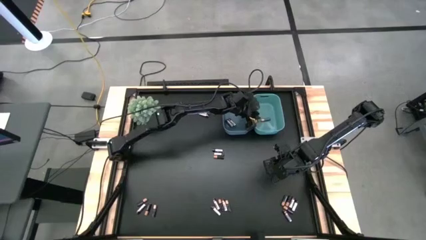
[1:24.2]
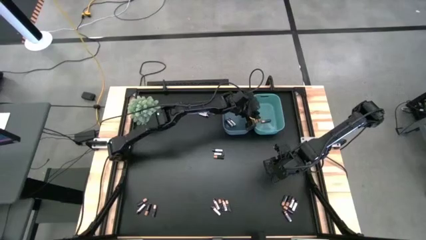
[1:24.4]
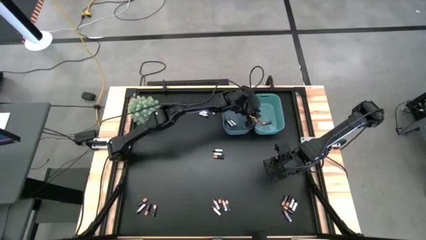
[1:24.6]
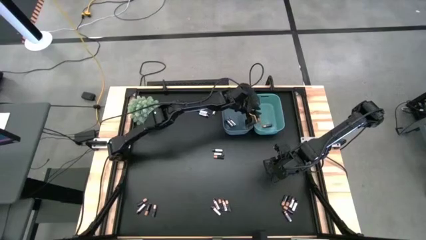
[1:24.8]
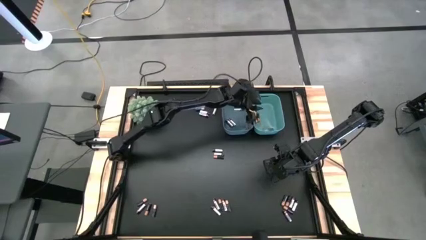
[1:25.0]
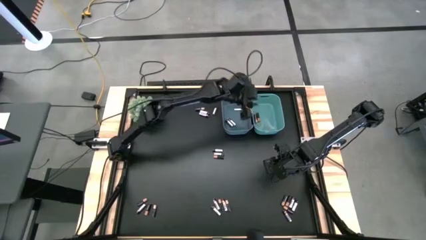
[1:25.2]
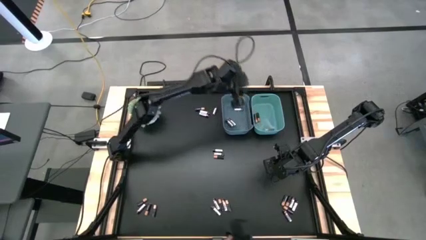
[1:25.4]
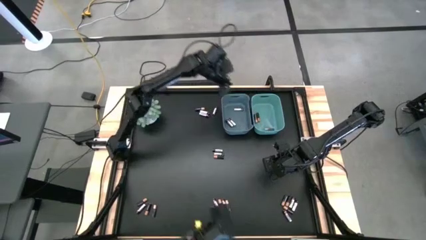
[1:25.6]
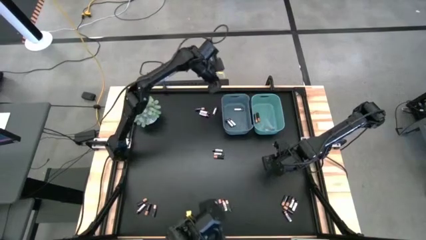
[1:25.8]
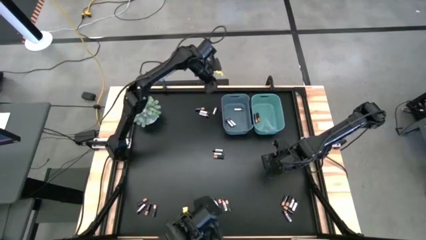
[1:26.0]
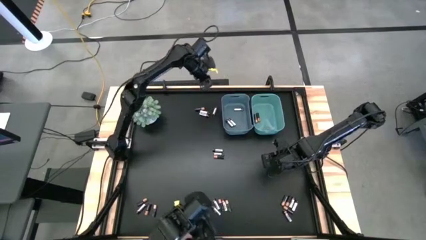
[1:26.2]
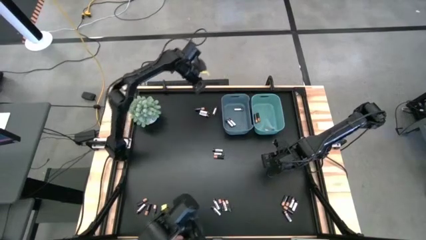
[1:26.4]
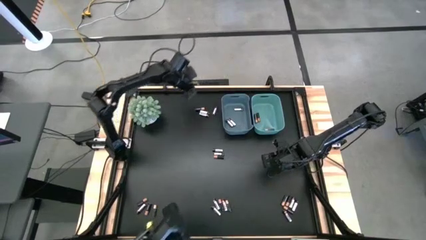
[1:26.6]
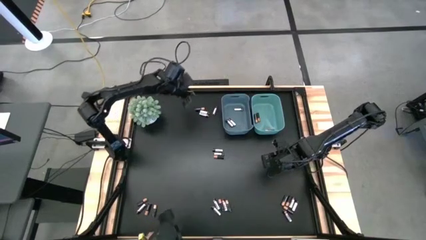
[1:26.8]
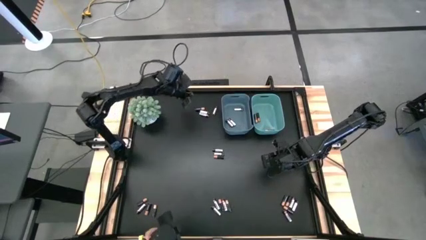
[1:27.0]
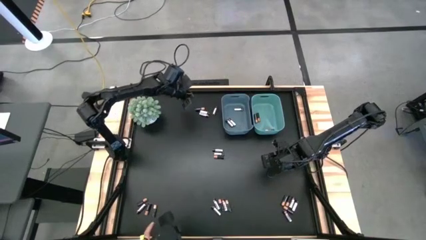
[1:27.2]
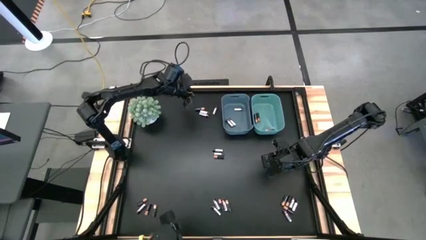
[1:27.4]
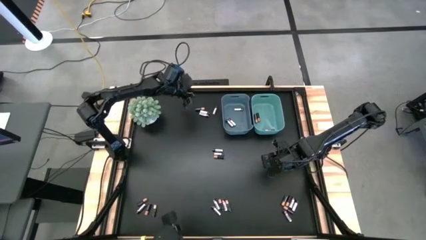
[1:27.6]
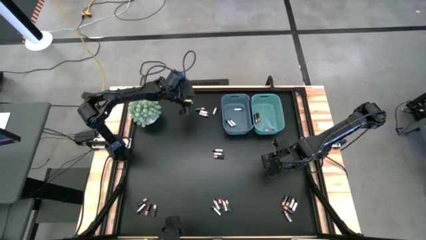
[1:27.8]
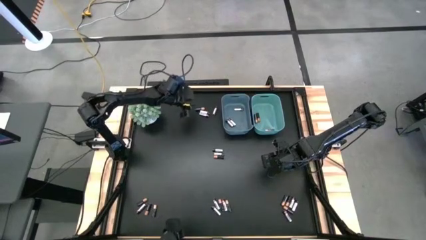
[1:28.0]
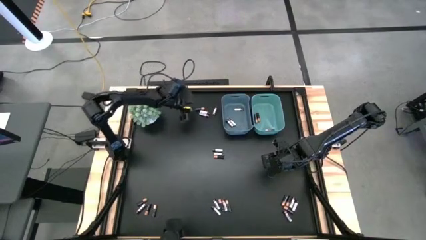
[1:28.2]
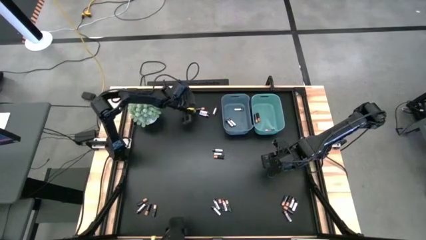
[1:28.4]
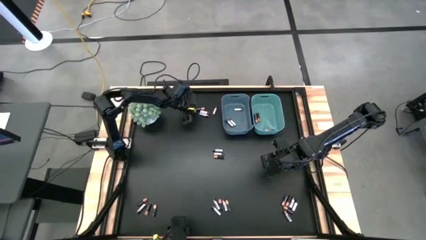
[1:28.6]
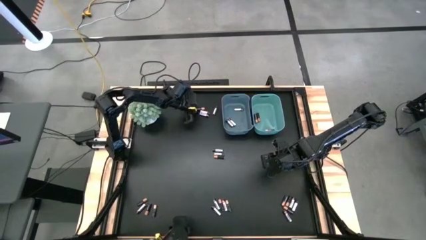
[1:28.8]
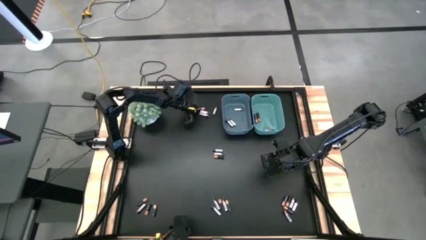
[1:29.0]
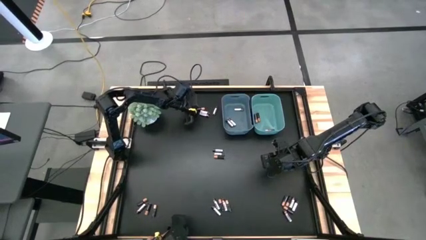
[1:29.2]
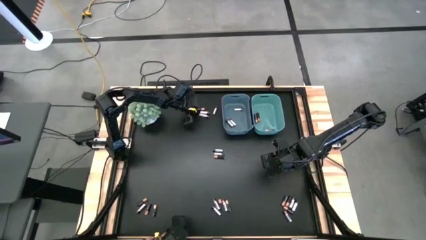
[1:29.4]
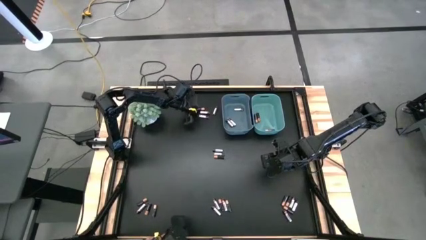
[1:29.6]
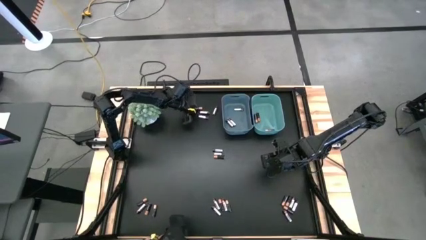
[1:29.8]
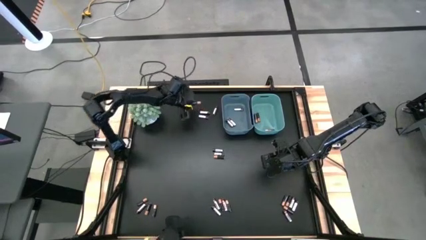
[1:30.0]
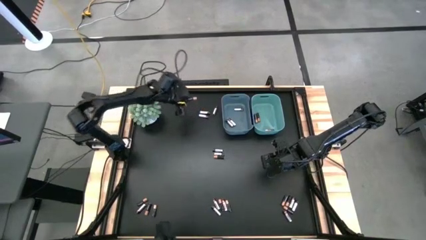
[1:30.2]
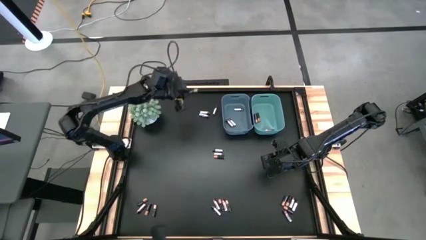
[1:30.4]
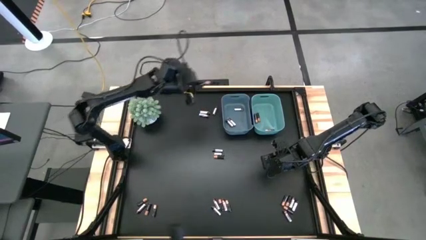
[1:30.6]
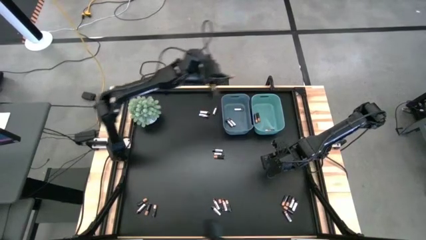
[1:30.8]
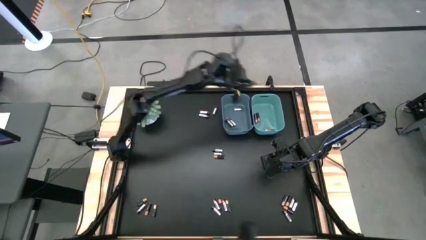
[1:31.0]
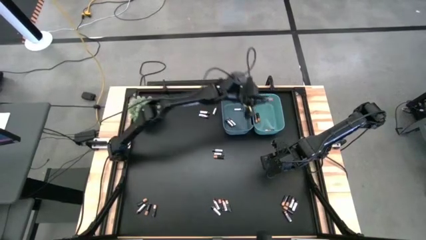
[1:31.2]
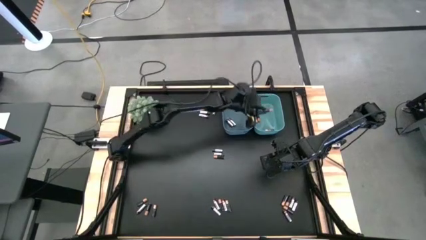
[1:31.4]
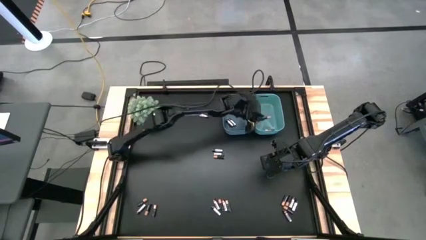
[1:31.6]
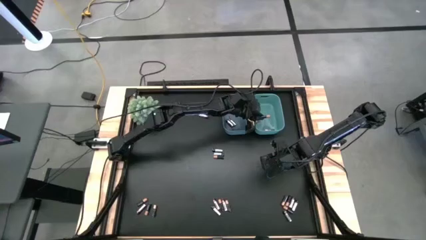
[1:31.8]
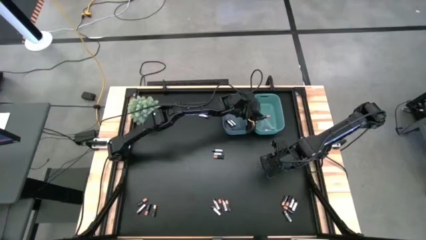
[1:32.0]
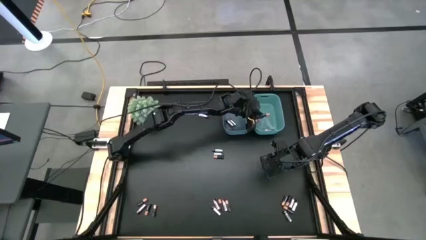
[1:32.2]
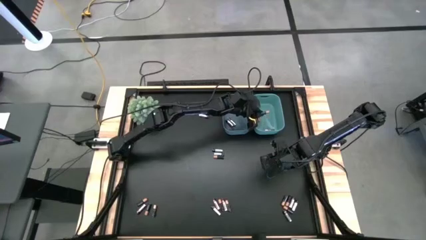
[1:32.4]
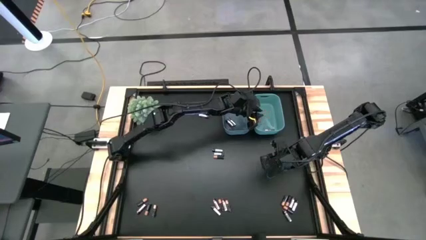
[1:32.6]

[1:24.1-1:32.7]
Task: Sort batteries
Put the black battery into the green bin

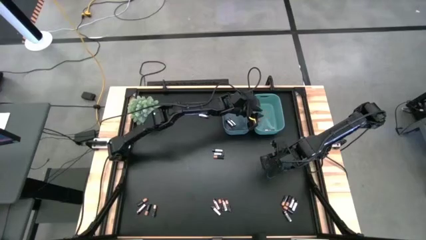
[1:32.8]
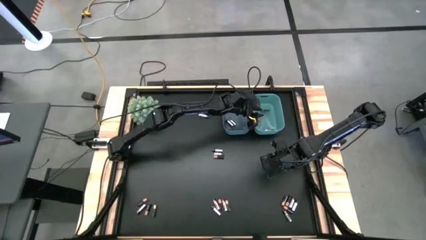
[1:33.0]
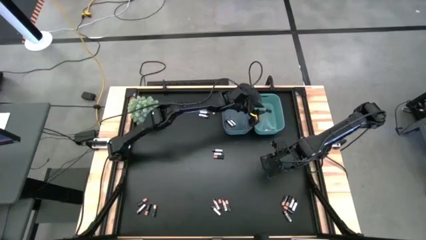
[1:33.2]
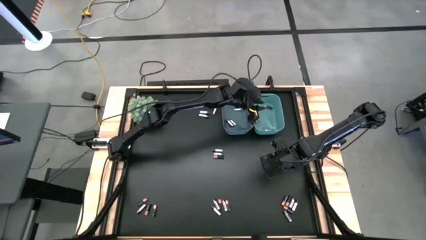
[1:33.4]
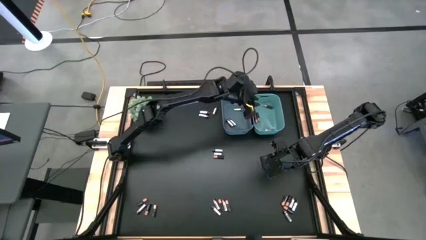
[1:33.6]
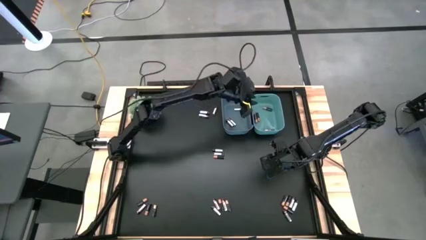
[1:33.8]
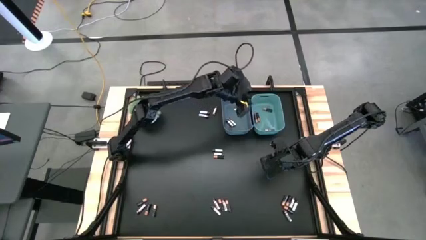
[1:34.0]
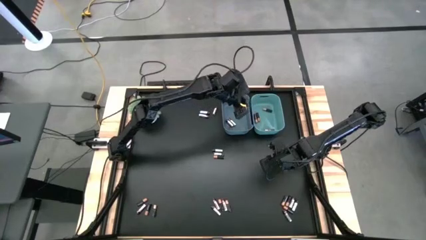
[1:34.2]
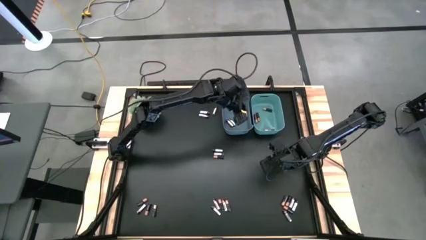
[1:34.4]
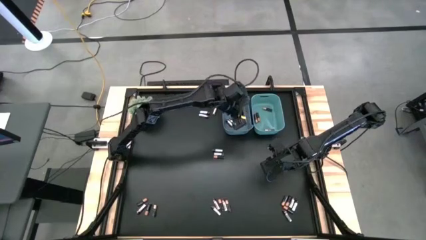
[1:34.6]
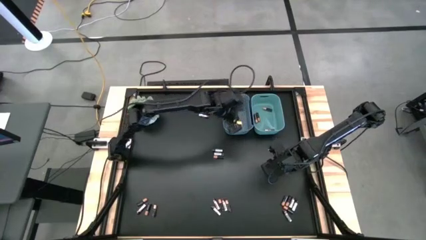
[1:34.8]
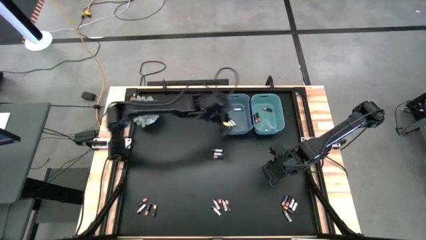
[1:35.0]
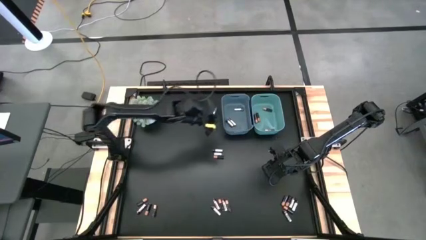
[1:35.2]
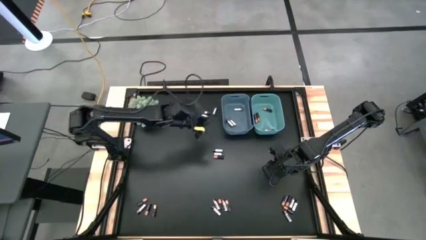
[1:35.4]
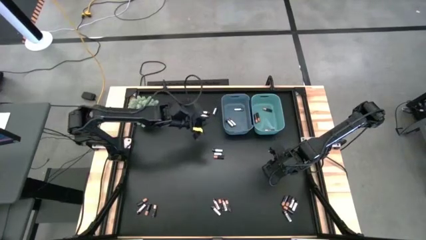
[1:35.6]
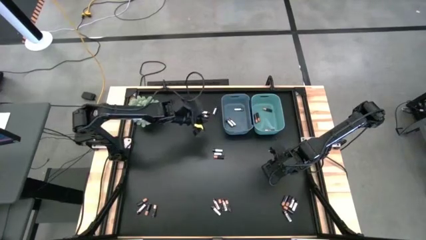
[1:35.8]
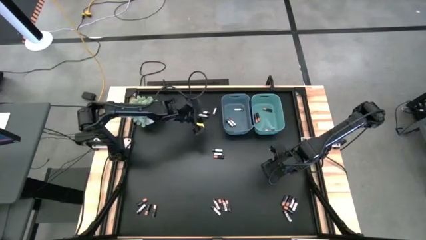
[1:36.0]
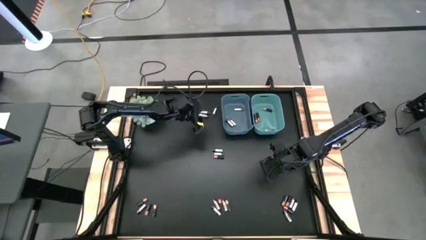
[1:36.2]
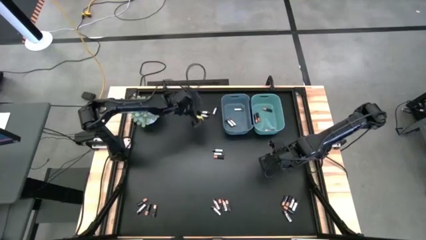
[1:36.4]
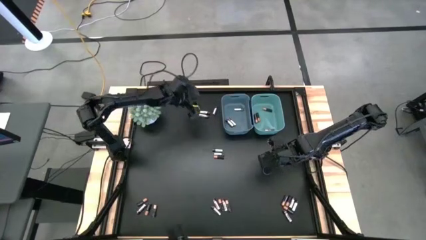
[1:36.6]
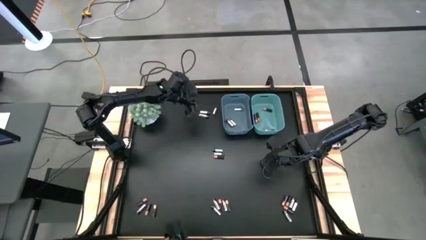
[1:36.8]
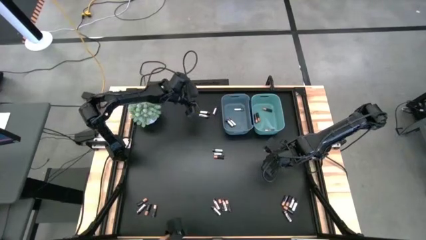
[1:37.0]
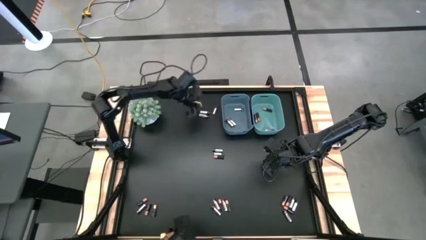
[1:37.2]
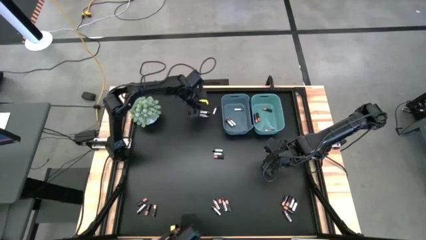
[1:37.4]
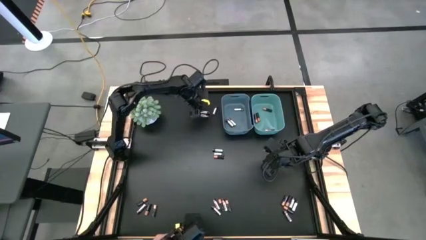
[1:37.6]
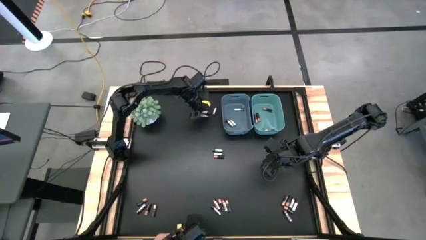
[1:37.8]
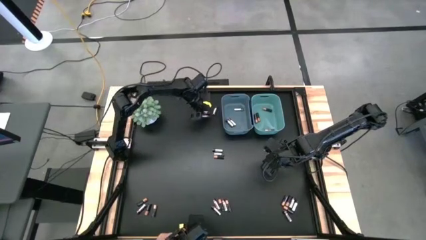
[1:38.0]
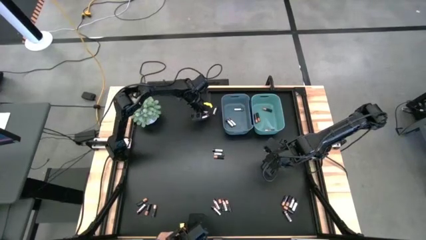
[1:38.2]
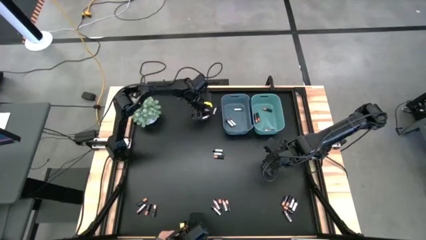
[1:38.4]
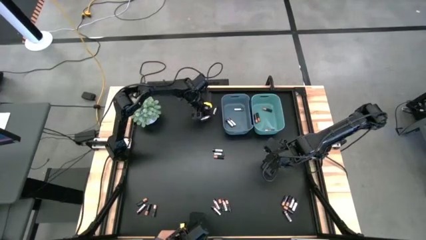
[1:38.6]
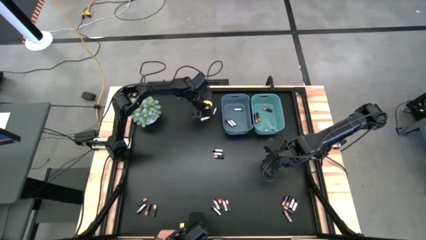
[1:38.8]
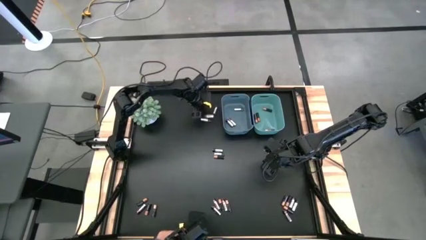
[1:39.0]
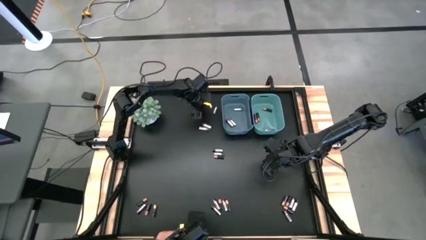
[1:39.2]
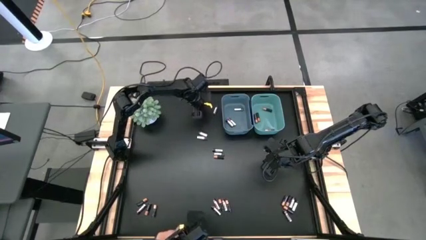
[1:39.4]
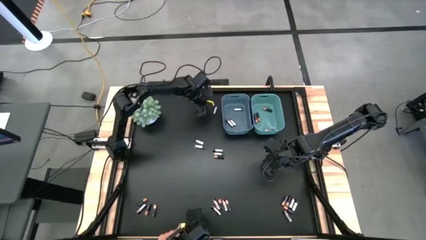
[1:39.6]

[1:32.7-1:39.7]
Put the silver battery into the blue bin

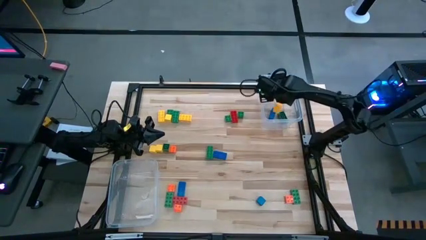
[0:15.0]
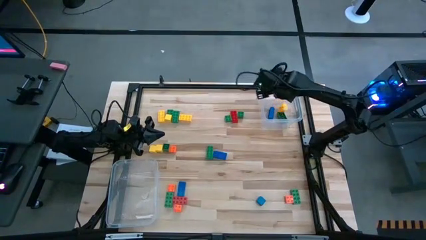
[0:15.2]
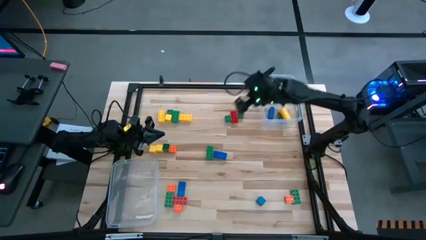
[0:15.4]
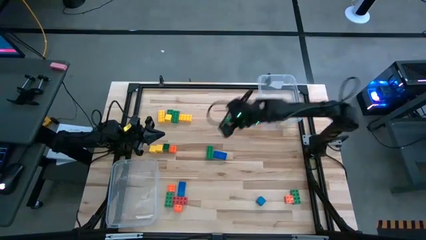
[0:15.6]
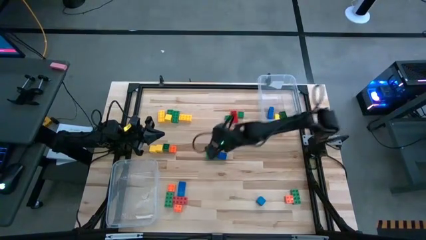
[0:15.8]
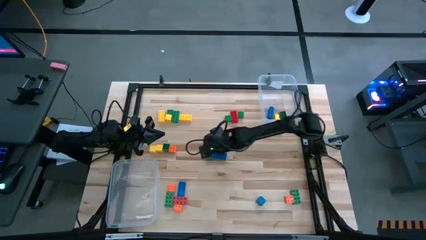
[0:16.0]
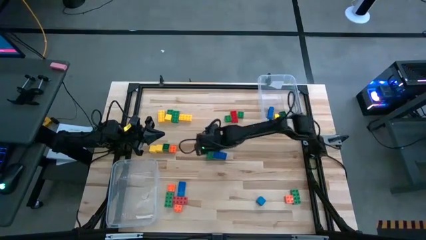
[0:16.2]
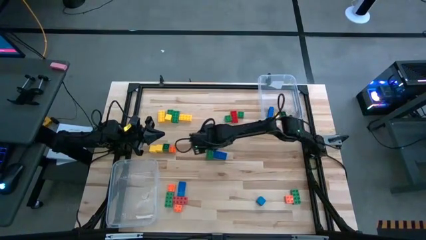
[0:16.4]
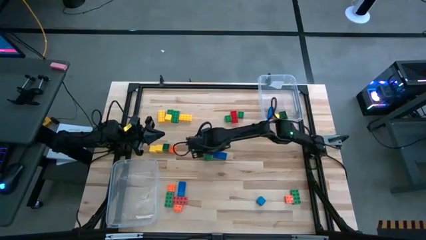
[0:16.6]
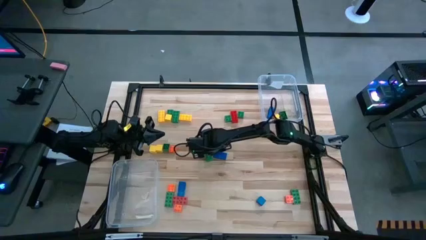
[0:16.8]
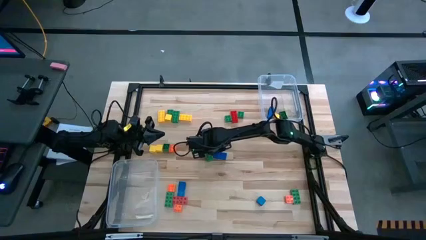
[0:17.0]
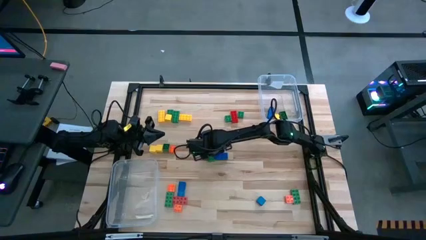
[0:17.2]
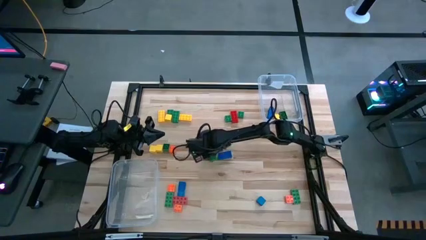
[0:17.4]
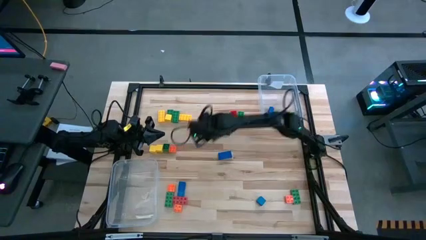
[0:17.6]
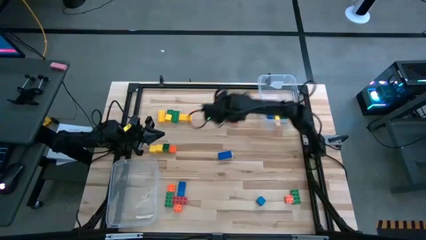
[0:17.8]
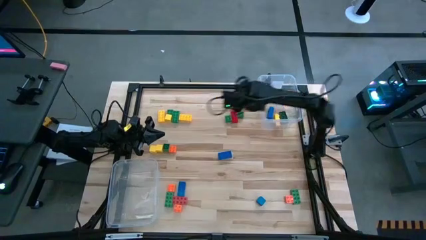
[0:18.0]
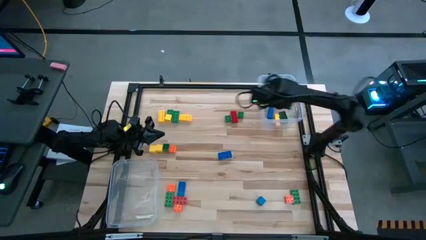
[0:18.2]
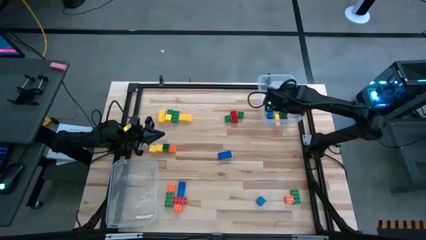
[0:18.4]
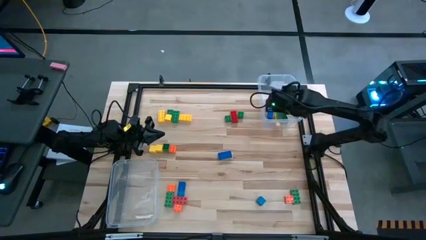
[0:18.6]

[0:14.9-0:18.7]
Task: Sort blocks by size
Put the middle large green game piece into the right transparent bin
